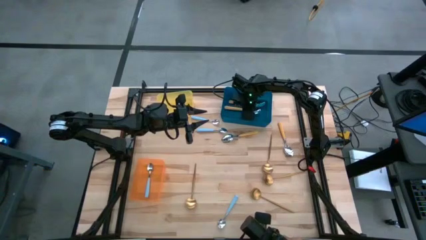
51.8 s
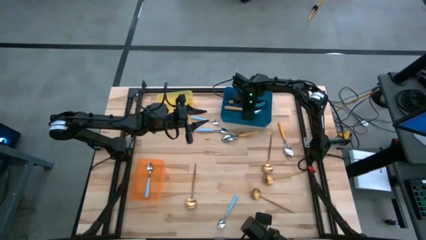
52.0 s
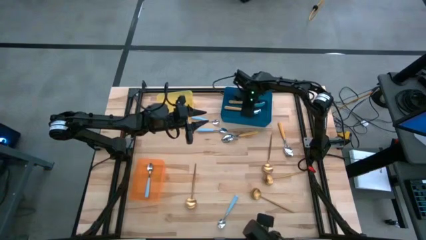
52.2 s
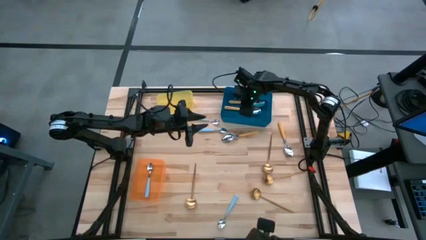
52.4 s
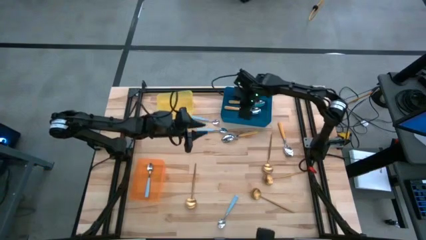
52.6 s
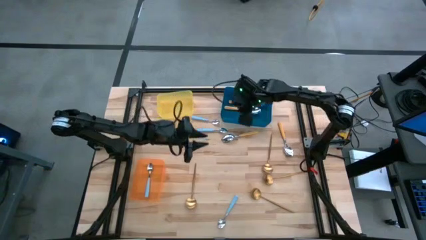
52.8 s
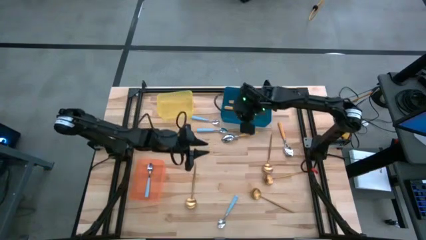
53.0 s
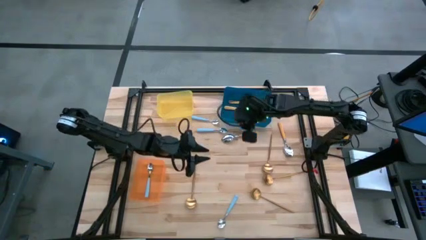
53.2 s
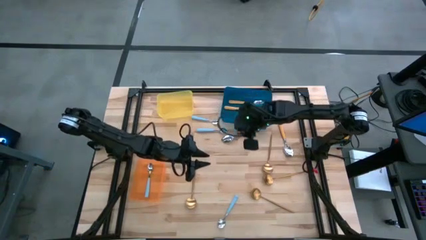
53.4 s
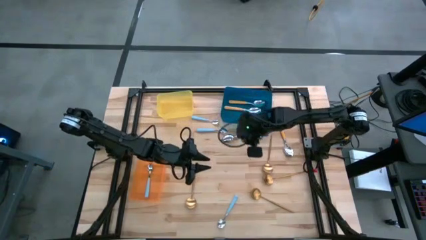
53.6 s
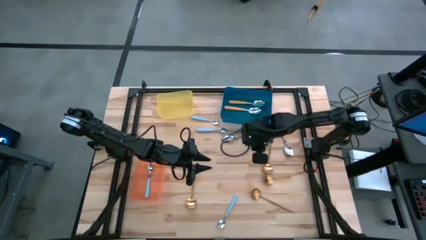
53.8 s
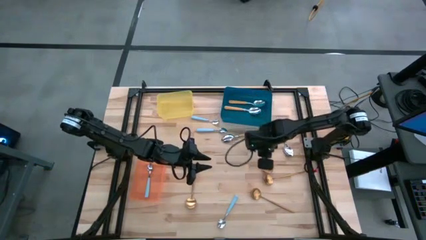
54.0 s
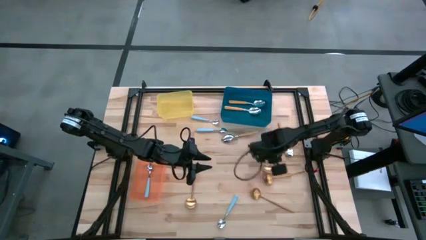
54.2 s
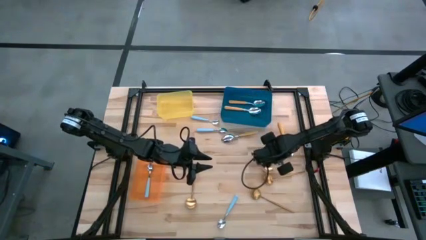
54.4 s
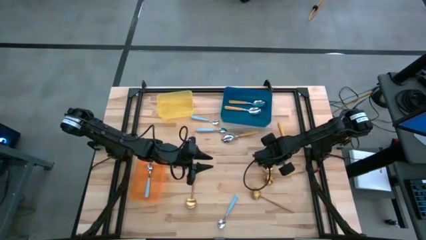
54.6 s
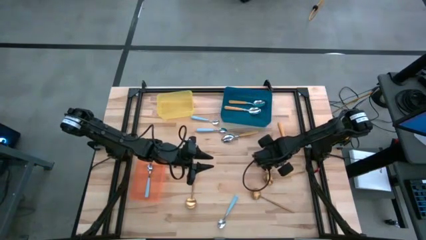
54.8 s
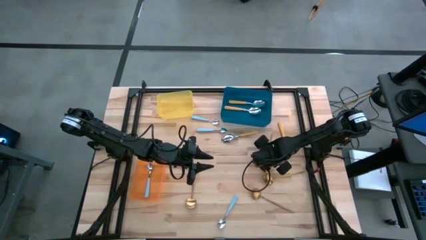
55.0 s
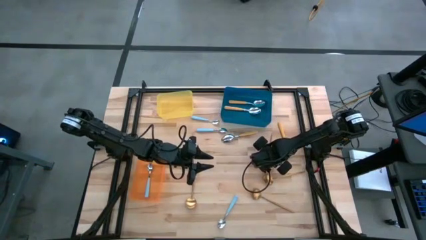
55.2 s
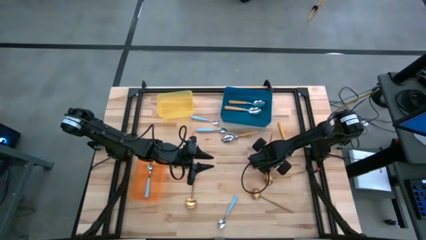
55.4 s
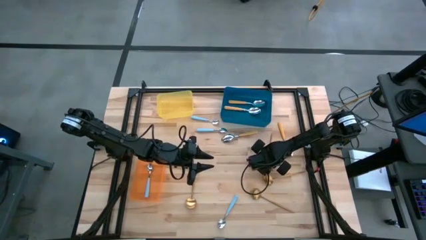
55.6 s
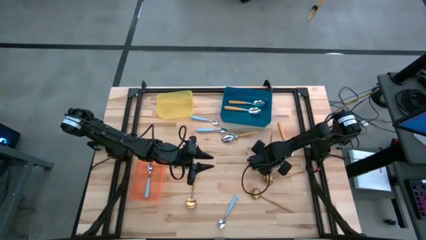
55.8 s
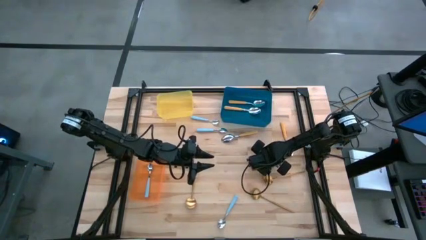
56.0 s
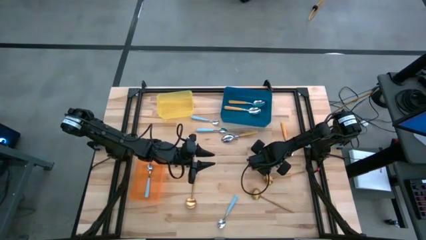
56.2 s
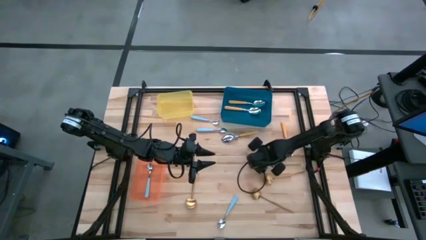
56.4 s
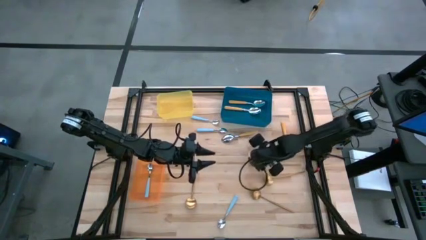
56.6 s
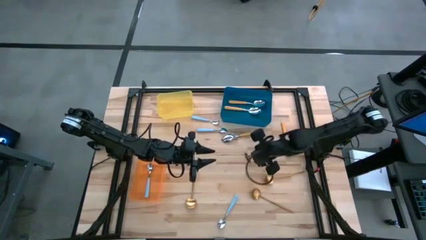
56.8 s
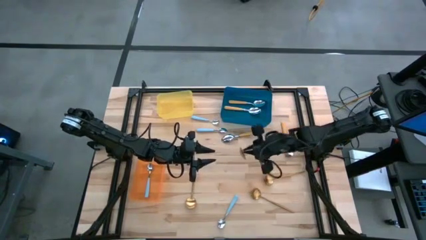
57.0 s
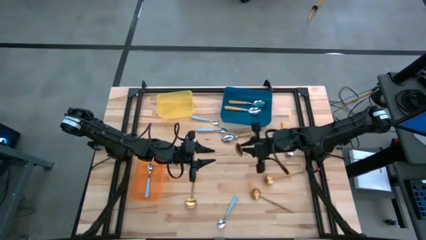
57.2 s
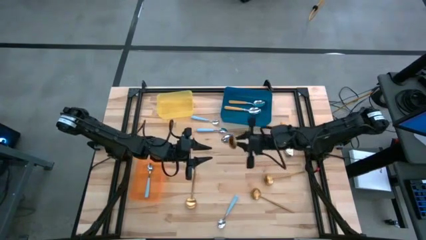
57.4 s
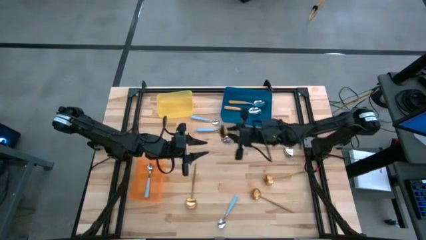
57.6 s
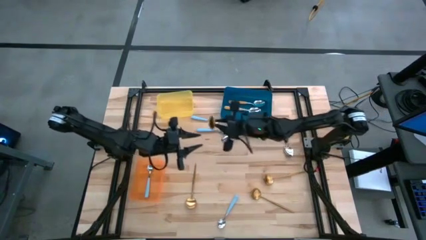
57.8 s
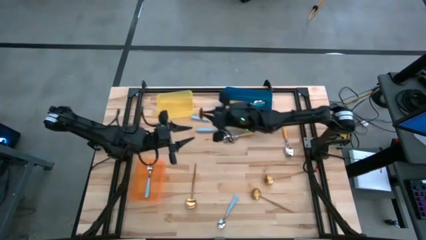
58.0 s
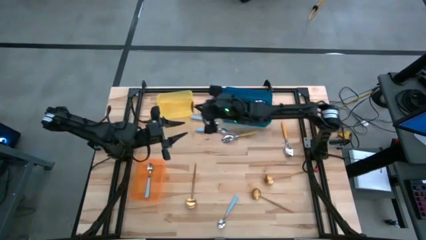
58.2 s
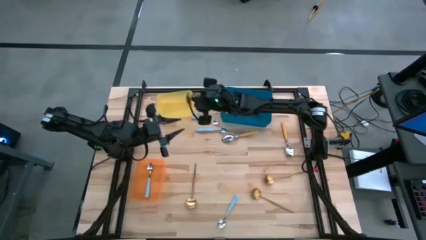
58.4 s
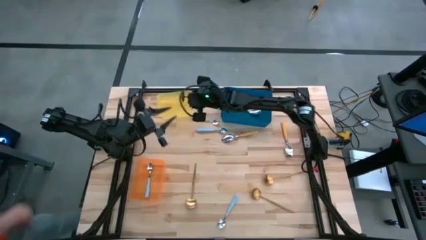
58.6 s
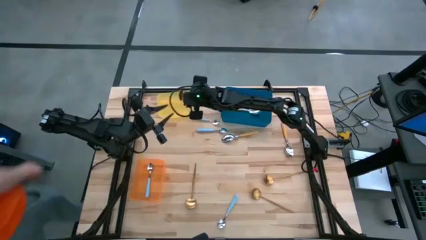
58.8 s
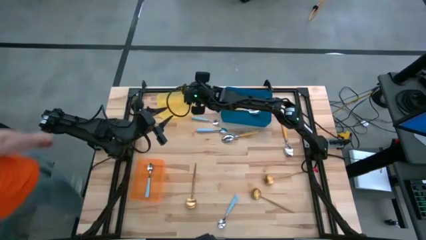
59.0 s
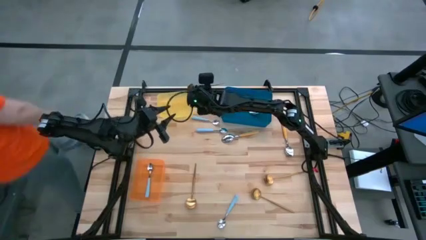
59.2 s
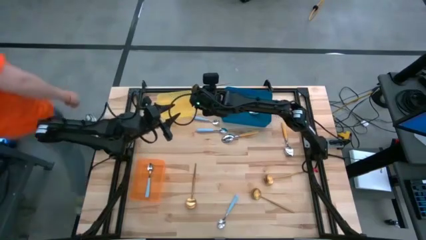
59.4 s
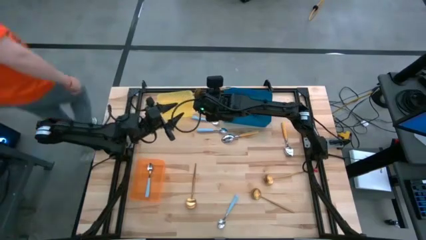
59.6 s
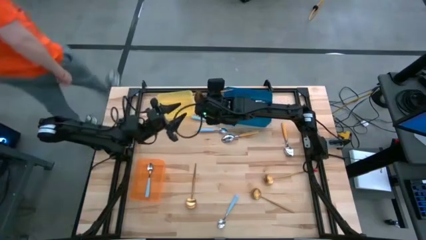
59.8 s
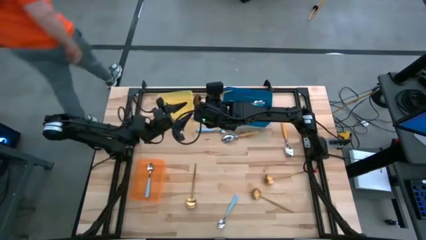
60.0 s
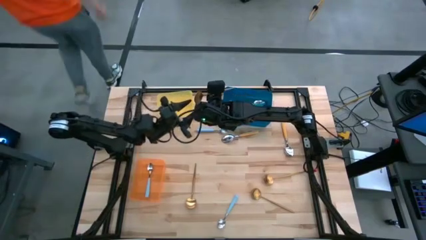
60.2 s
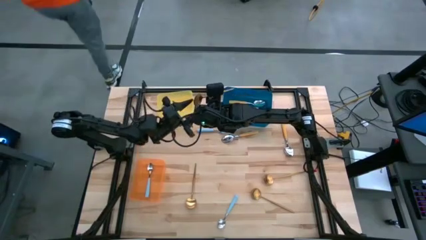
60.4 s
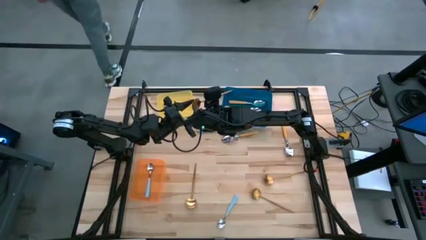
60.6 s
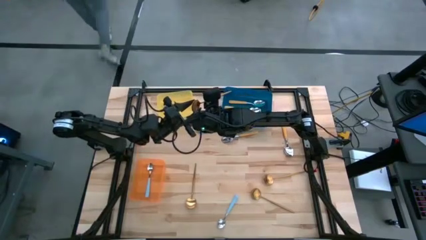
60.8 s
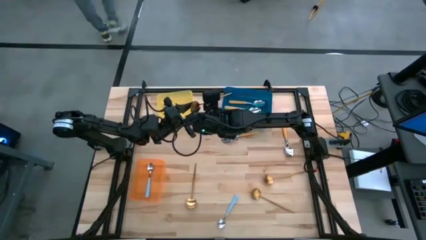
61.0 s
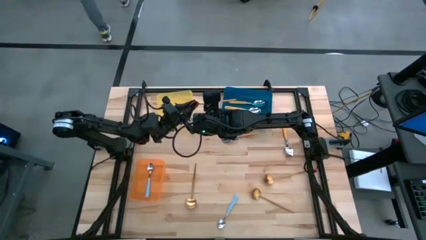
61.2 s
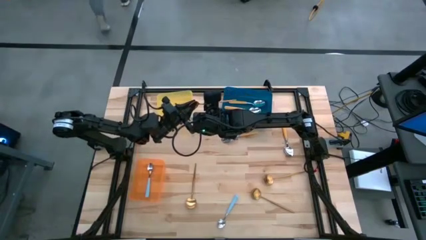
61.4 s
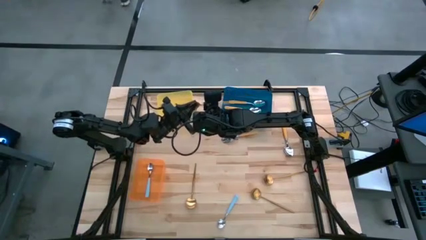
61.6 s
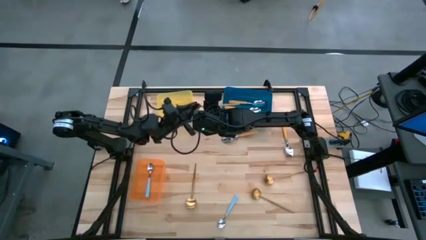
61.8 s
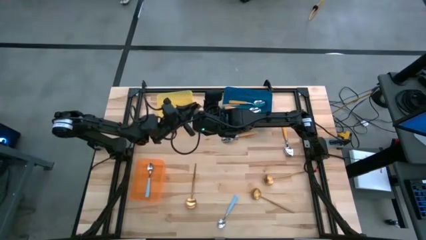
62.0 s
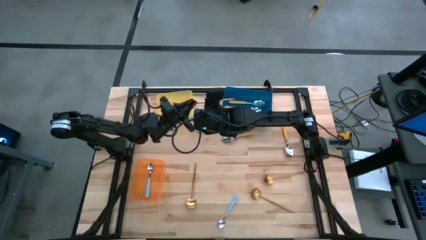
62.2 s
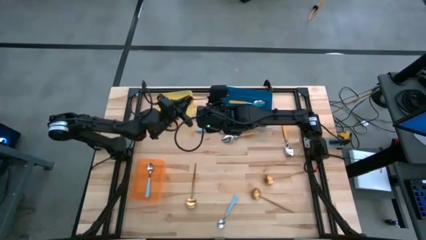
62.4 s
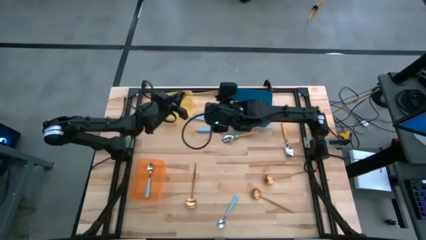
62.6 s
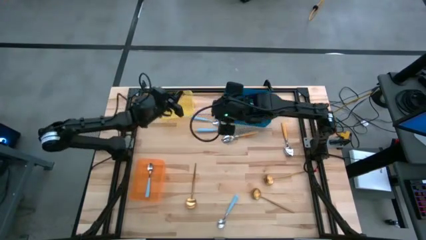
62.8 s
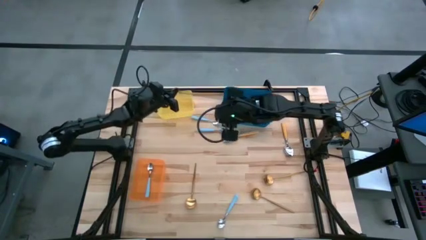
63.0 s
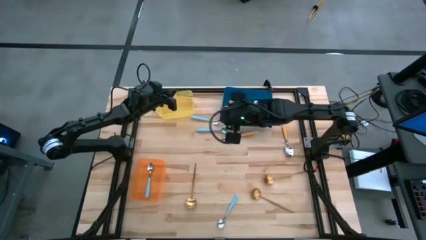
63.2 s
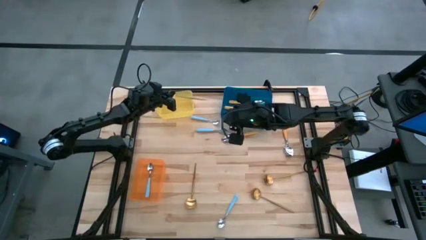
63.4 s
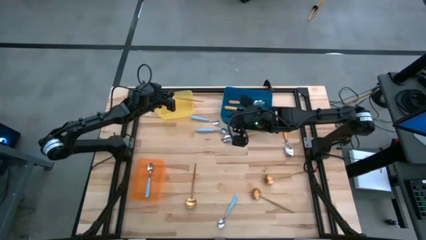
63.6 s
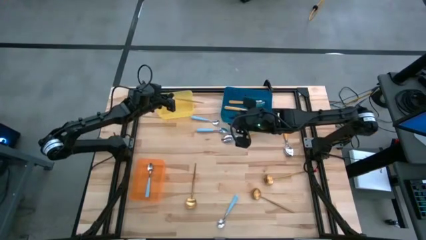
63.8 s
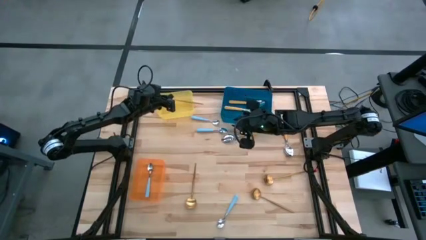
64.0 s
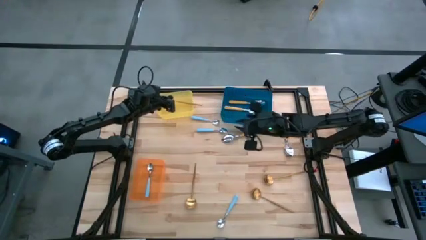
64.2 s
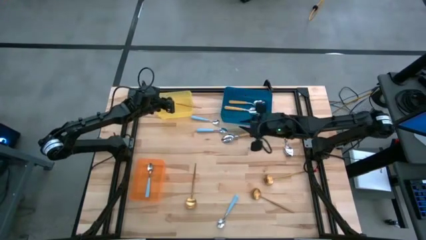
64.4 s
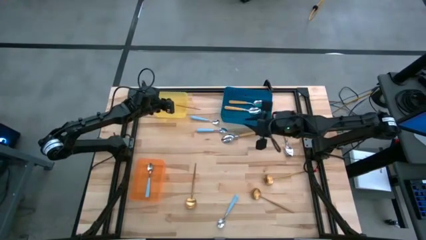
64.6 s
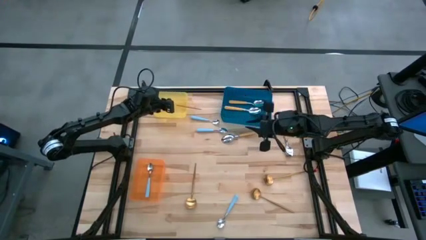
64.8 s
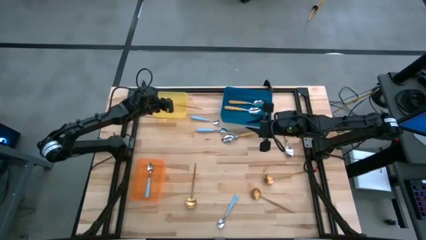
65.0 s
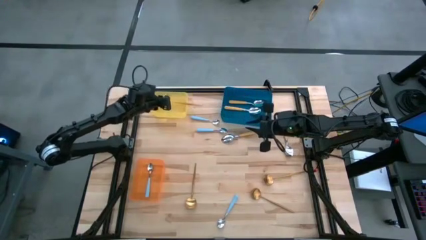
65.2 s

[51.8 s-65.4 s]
Task: Sort silverware by color (type)
Put the gold spoon into the yellow bin

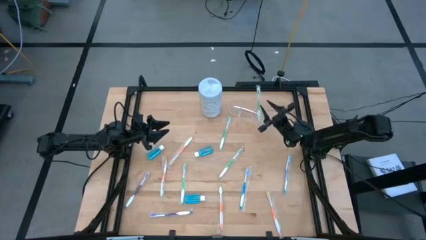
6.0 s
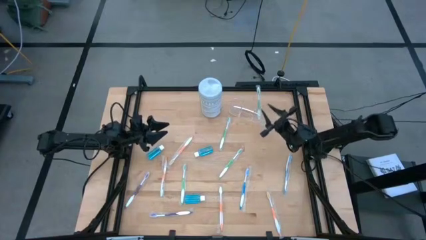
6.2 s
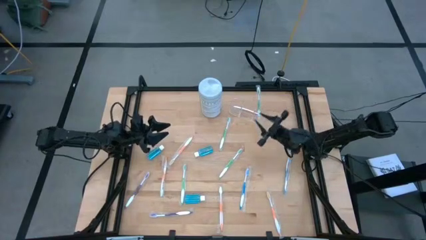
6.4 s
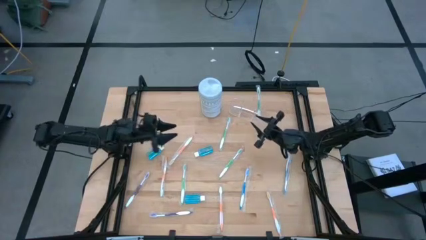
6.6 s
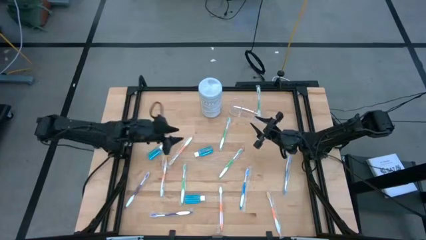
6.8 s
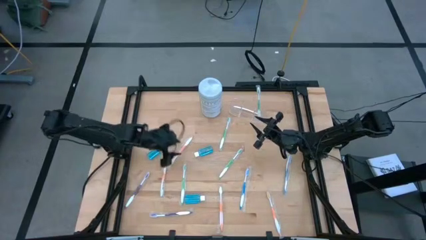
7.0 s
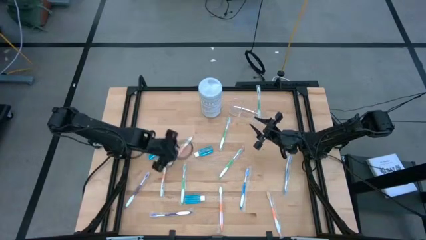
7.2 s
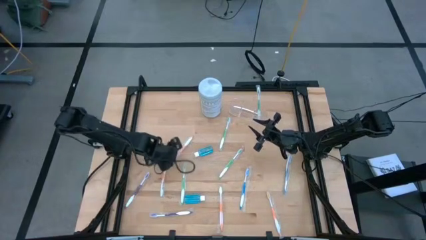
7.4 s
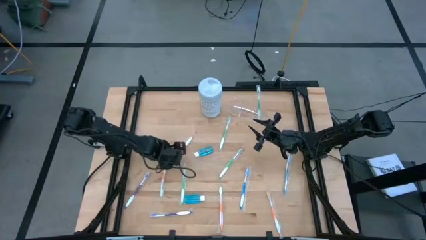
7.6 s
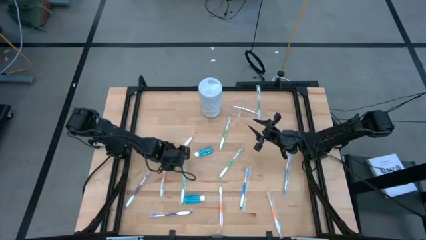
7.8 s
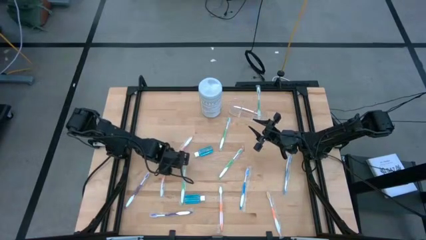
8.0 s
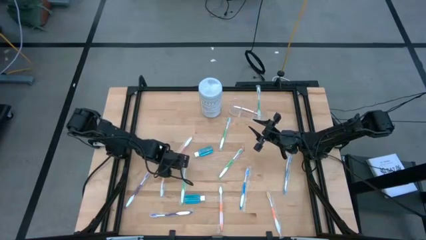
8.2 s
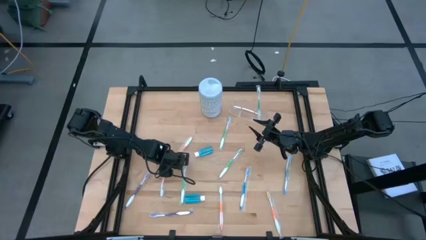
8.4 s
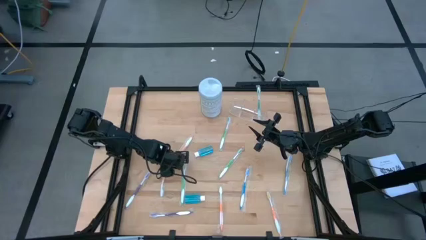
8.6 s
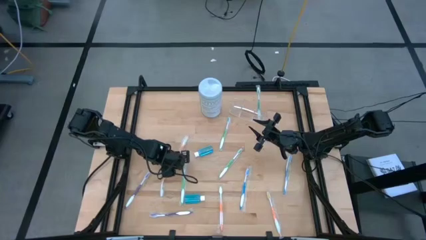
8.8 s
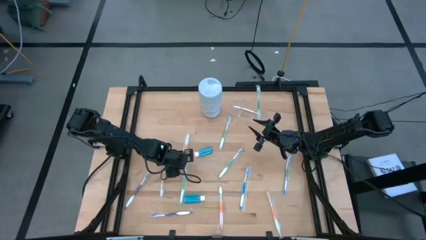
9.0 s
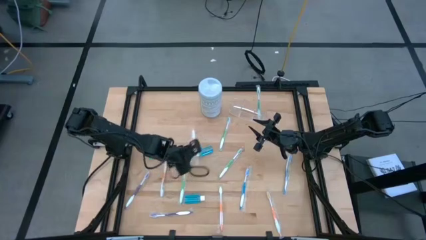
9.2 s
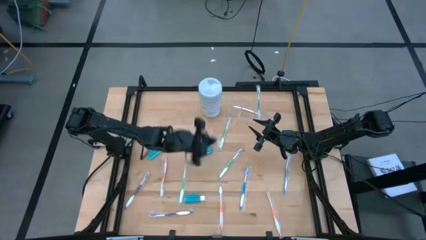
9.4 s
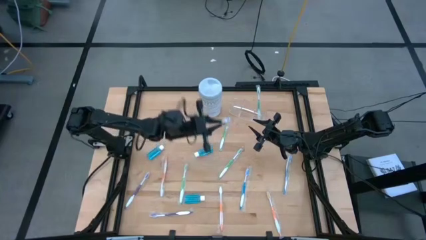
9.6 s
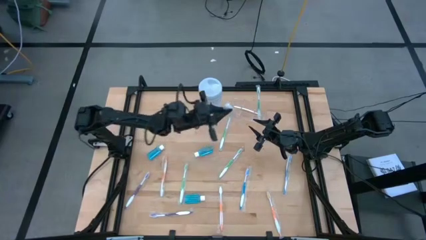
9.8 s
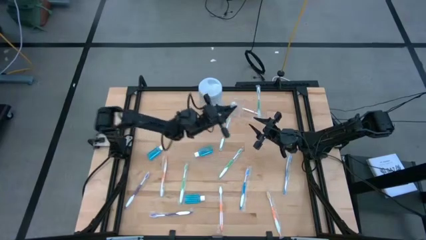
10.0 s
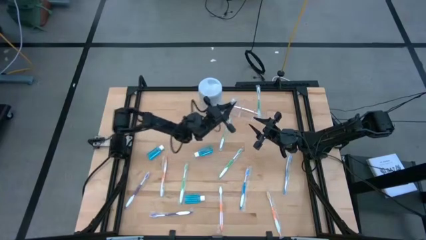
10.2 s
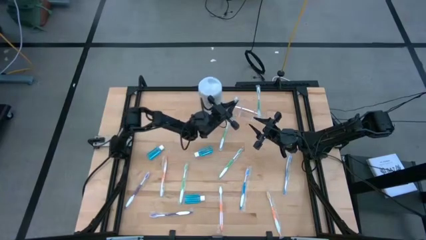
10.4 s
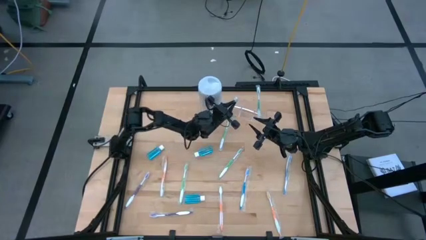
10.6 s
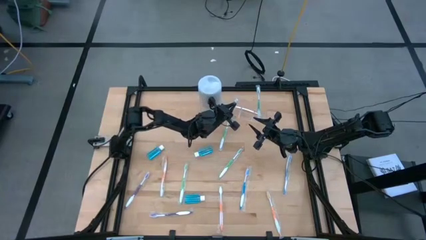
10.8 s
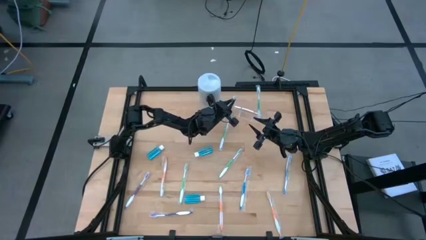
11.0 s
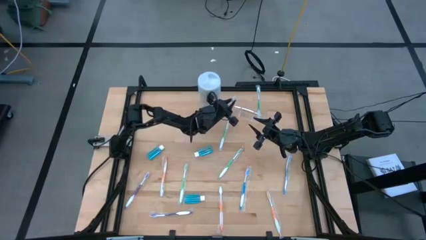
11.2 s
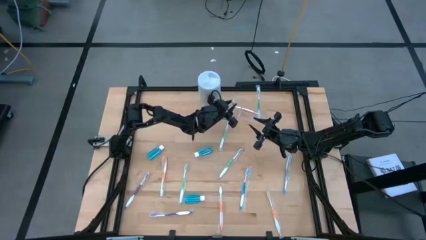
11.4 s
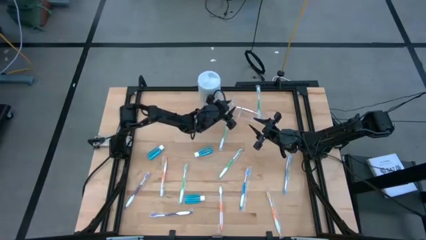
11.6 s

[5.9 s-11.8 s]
Task: Pick & Place toothbrushing station
Put the white and orange toothbrush into the transparent mesh organizer
